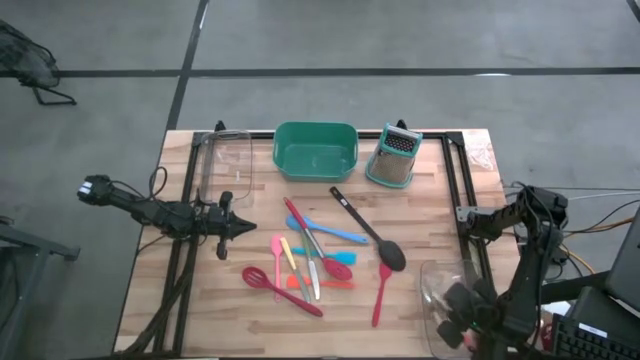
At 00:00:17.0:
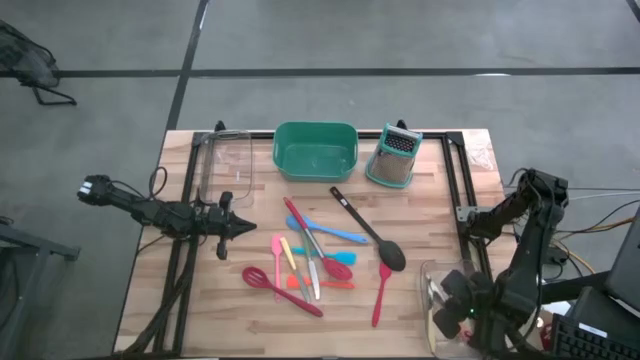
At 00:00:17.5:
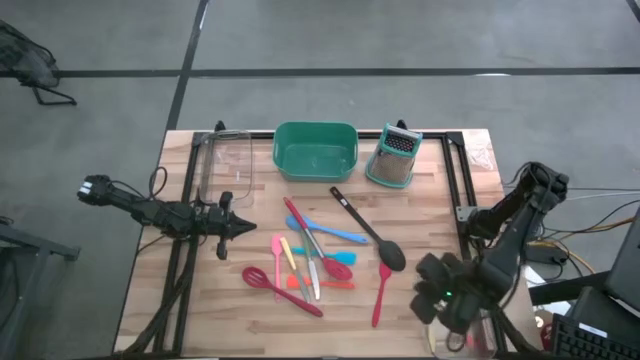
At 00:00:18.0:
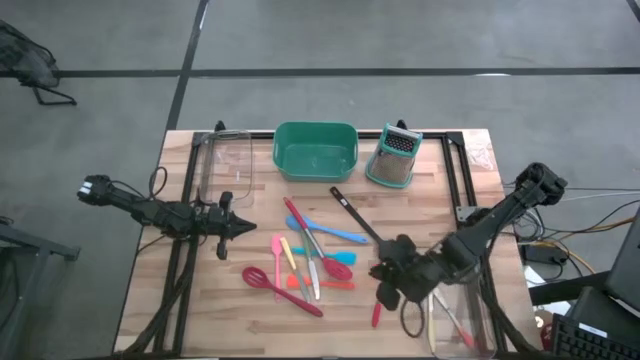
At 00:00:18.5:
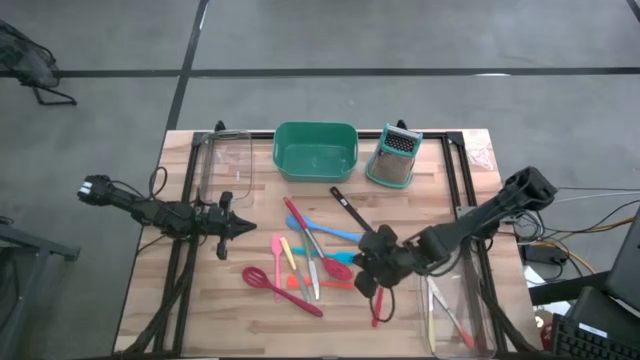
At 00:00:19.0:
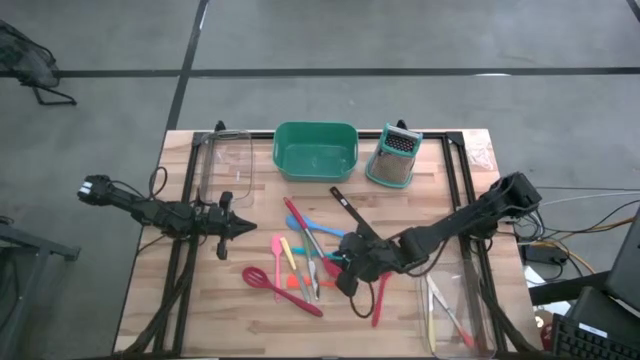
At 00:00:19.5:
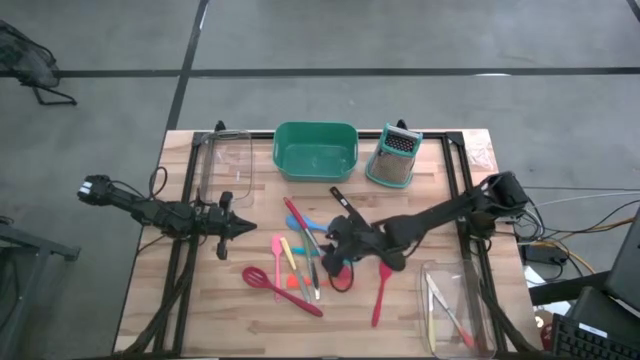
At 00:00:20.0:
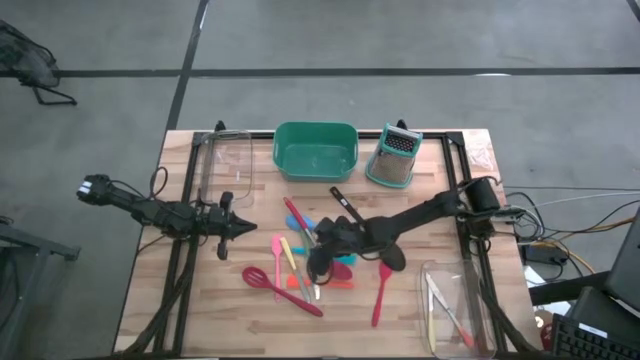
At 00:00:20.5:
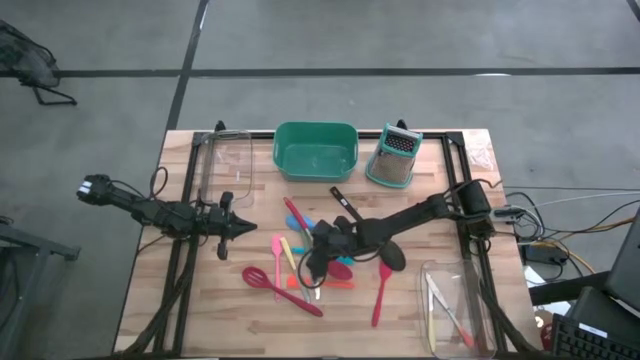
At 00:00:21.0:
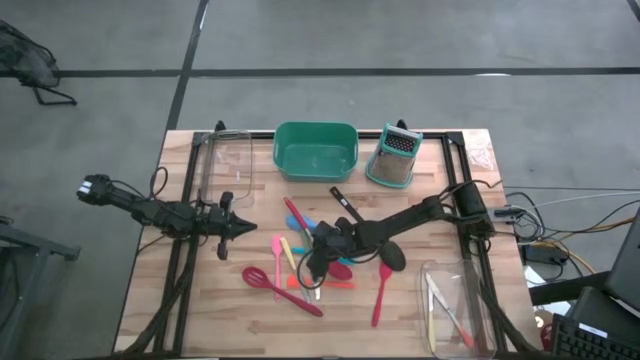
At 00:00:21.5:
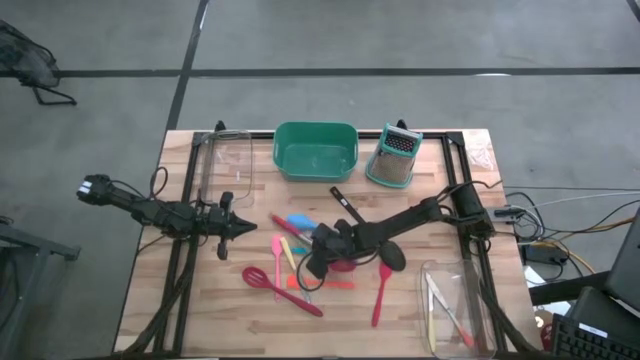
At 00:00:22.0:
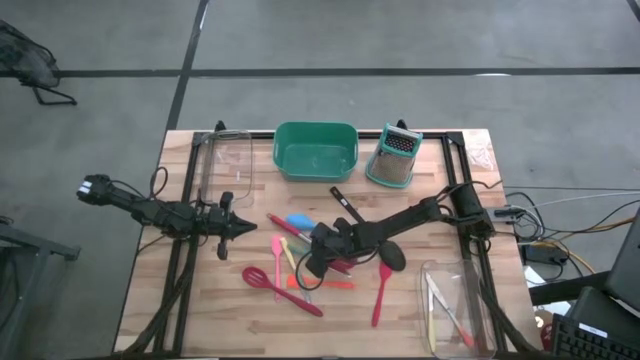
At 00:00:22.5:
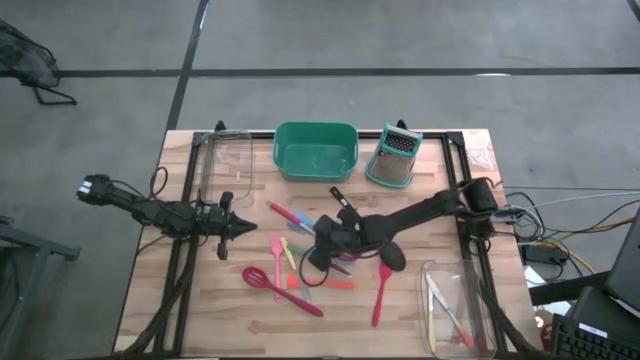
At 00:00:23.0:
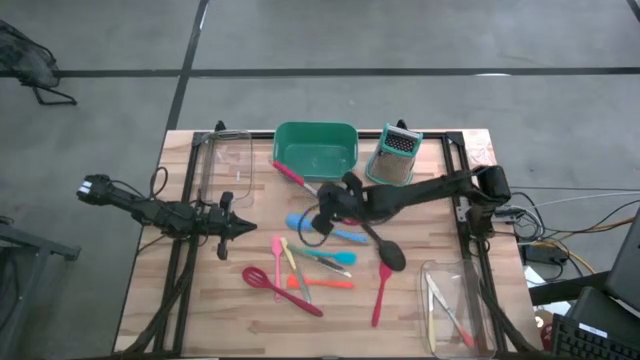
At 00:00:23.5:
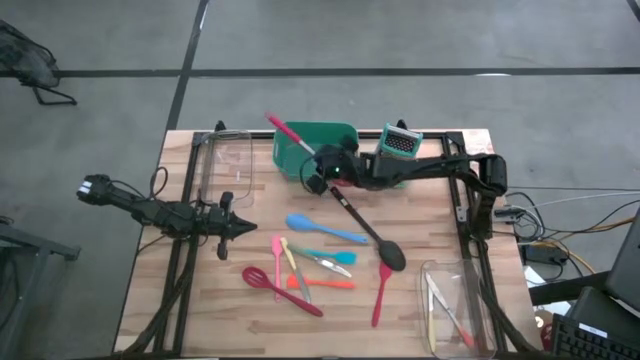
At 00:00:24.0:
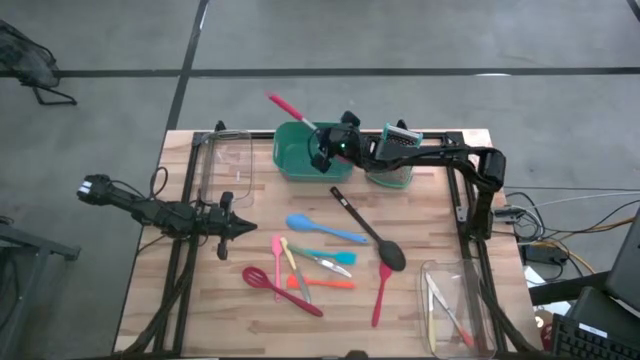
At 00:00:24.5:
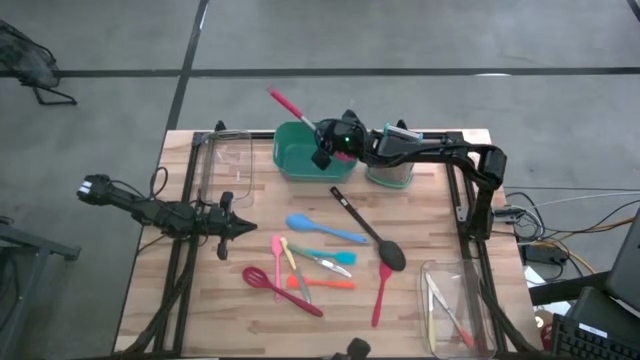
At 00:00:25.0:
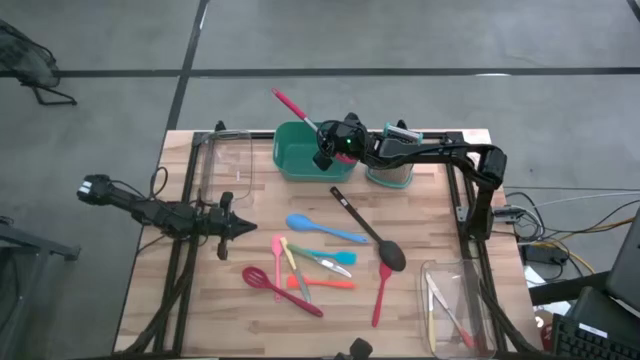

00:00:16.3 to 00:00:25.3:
Task: Pick & Place Kitchen Items
Put the red and silver serving spoon into the green bin

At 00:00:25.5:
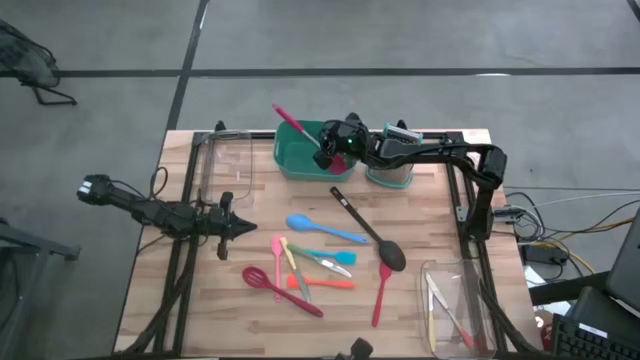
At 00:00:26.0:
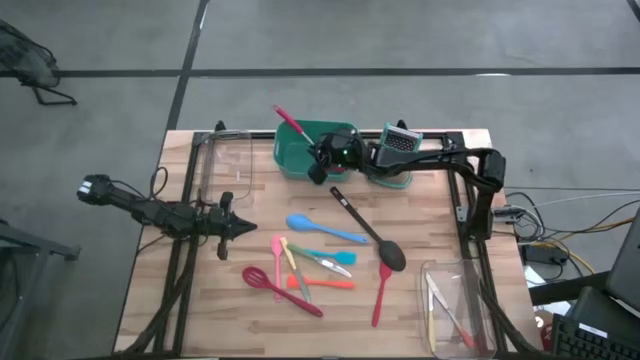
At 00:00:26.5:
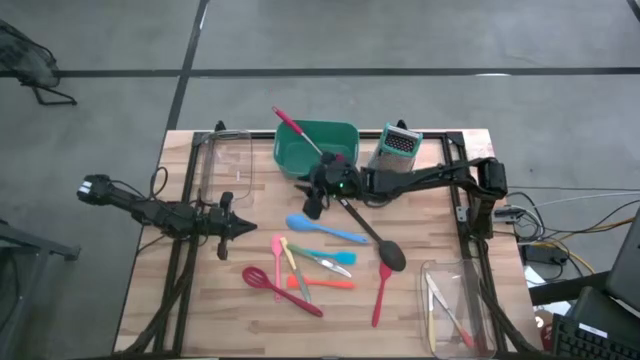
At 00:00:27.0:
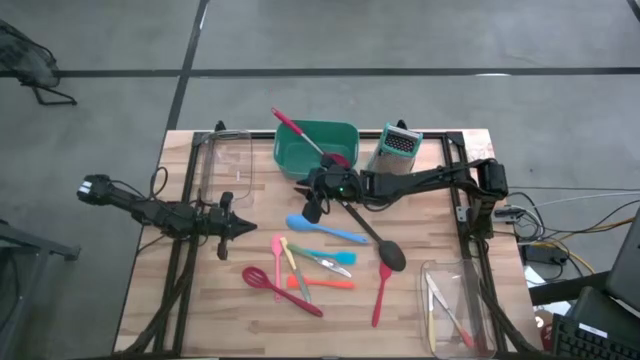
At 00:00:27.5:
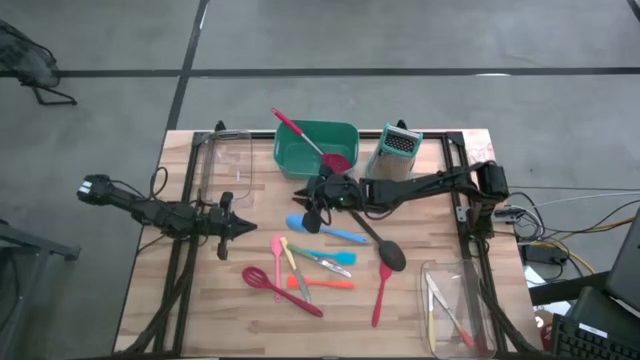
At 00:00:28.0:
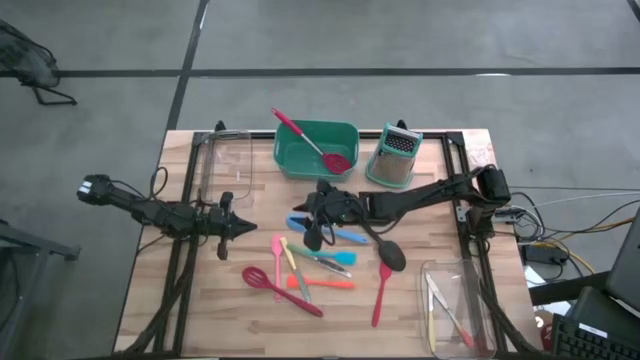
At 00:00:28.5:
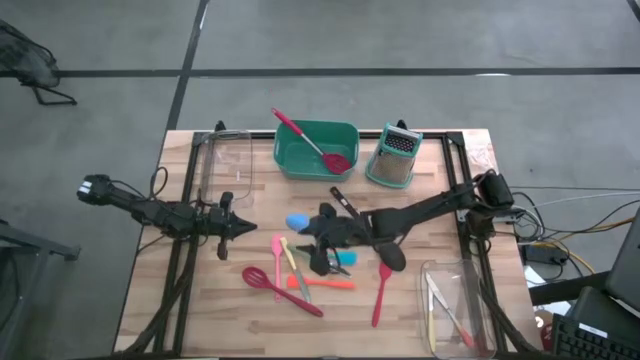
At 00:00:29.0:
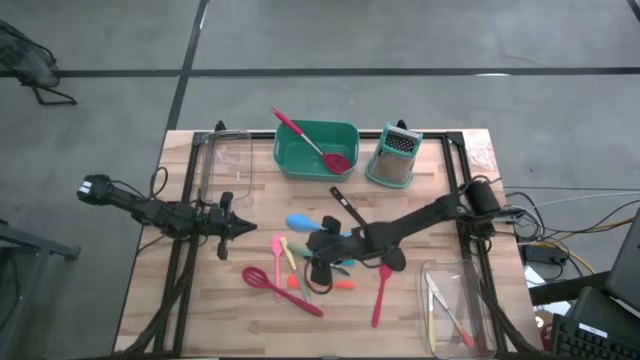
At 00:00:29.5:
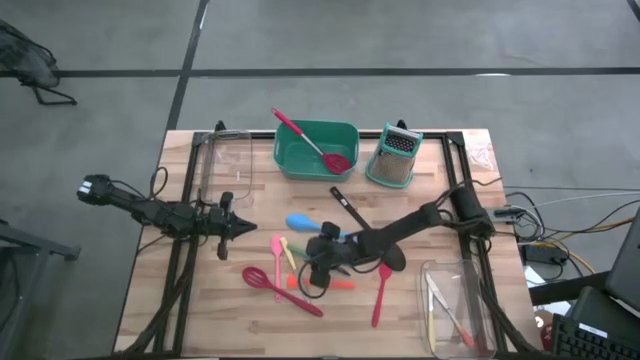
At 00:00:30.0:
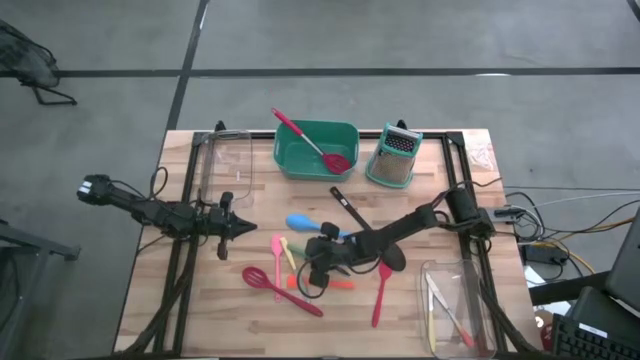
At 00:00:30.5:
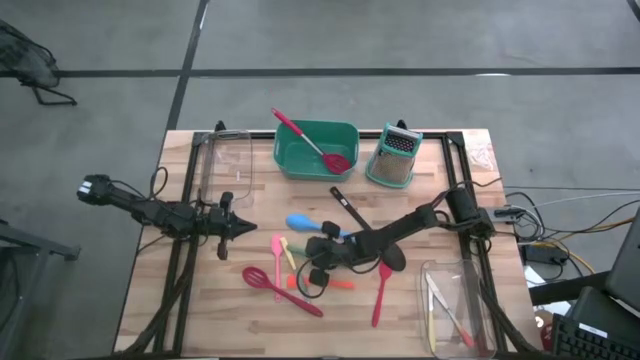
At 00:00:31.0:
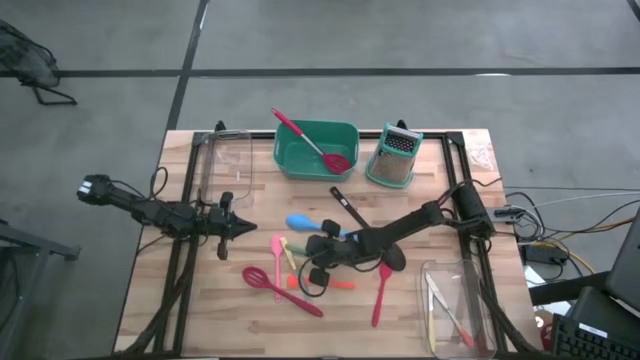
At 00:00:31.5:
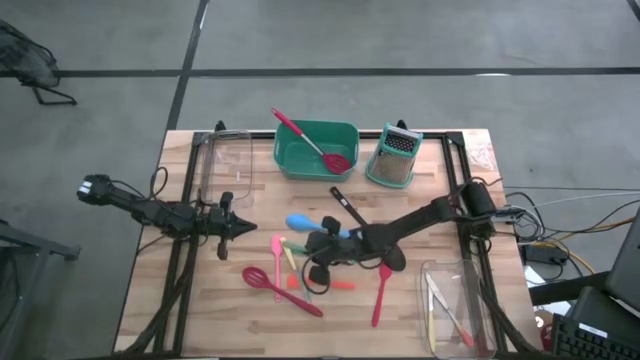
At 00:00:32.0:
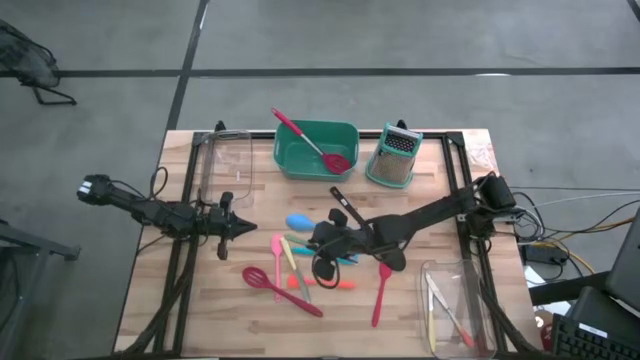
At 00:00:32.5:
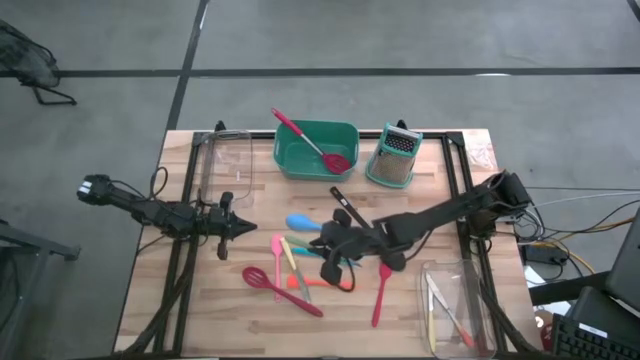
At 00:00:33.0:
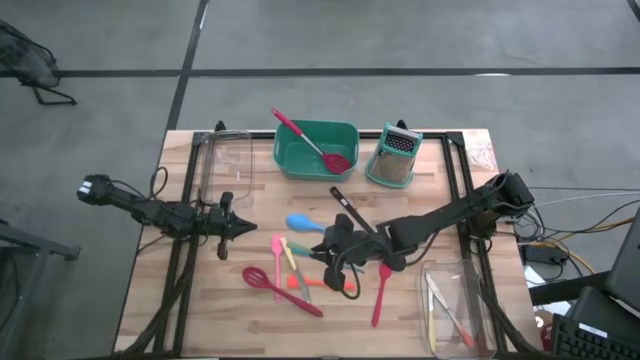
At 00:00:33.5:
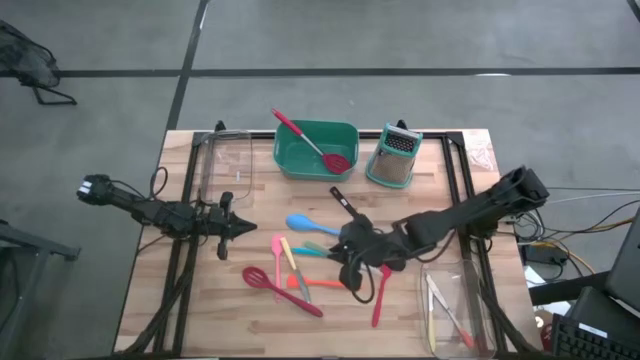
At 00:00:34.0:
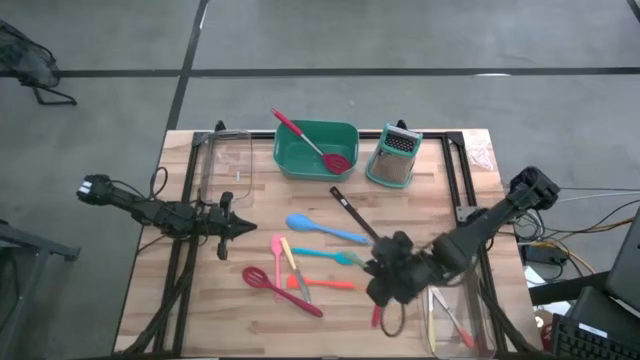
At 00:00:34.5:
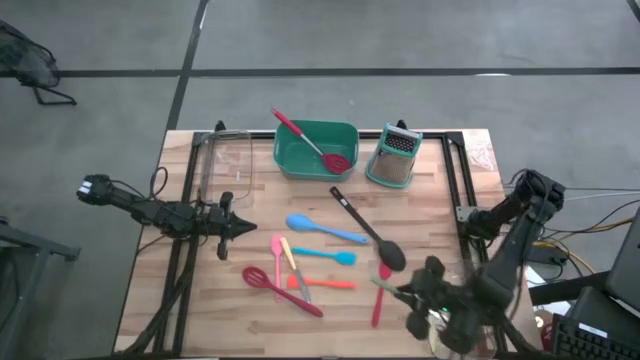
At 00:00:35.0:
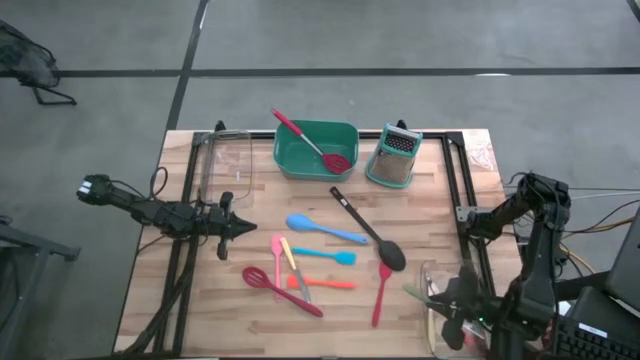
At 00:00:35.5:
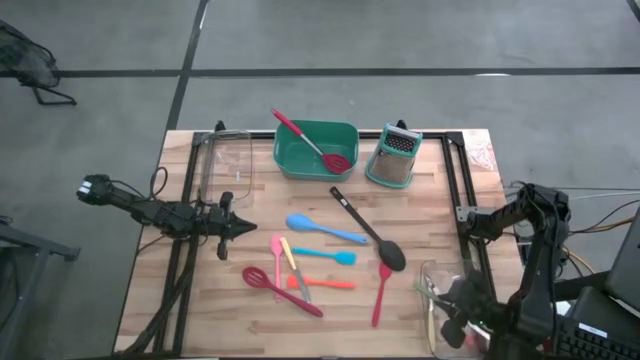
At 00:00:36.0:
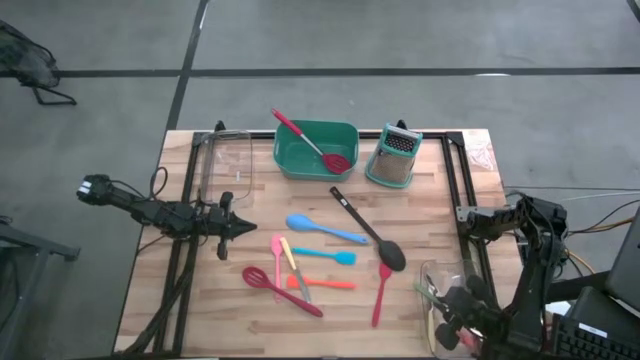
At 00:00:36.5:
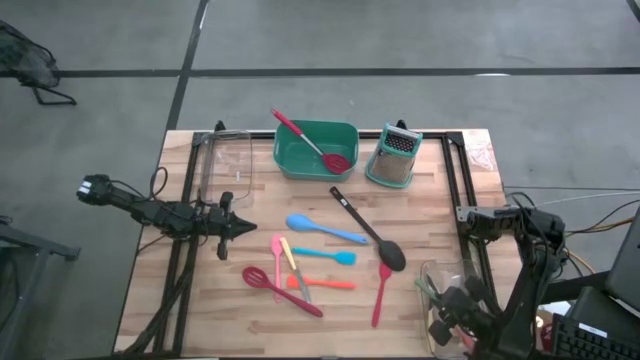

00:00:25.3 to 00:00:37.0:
Put the green knife into the bottom right transparent bin

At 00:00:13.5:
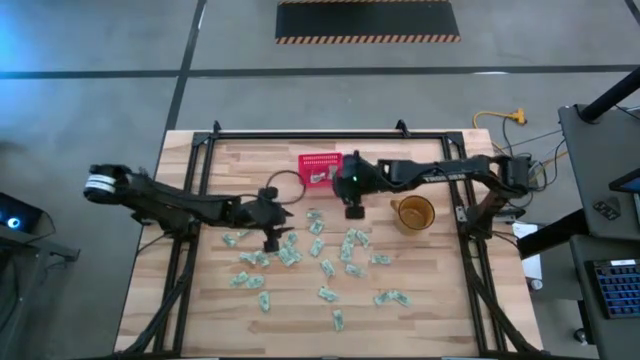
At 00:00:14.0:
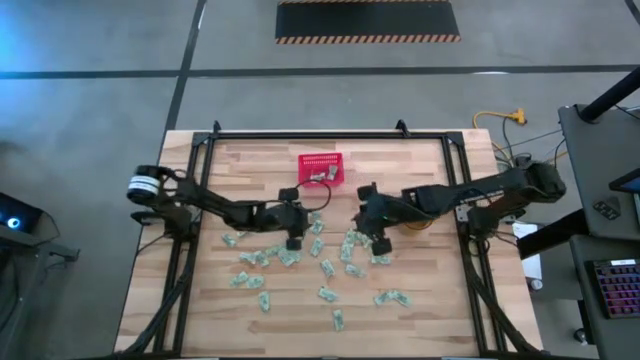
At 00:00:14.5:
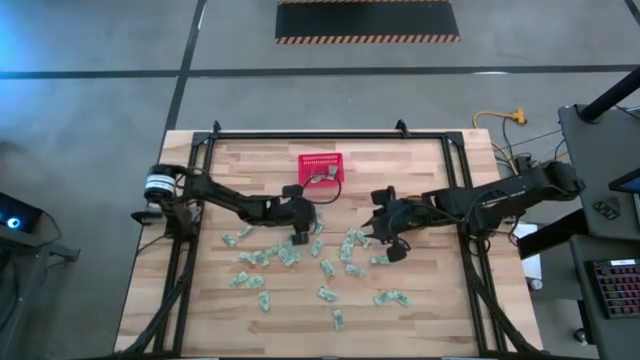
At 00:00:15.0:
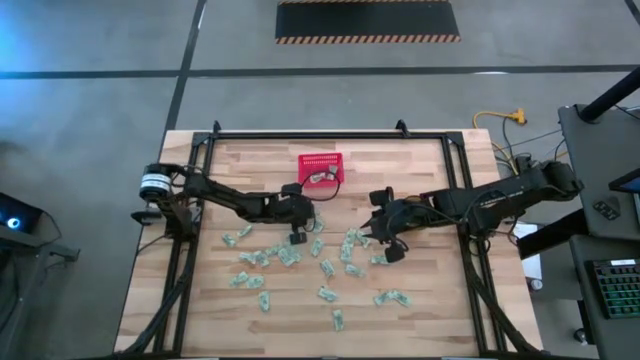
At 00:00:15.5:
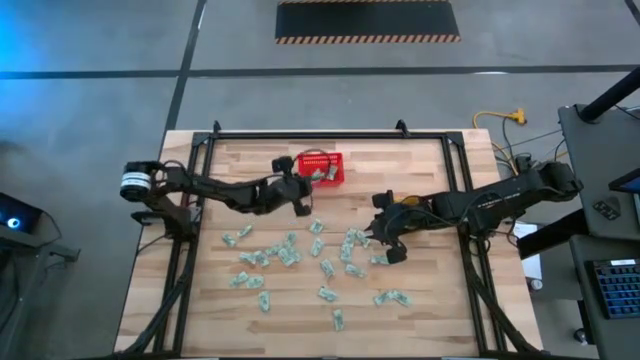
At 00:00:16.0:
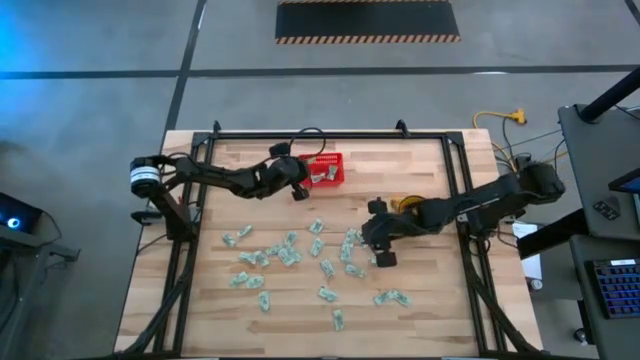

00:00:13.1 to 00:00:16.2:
Task: Pick and place Stevia / Truvia into bins
Put the white stevia packet into the red bin
